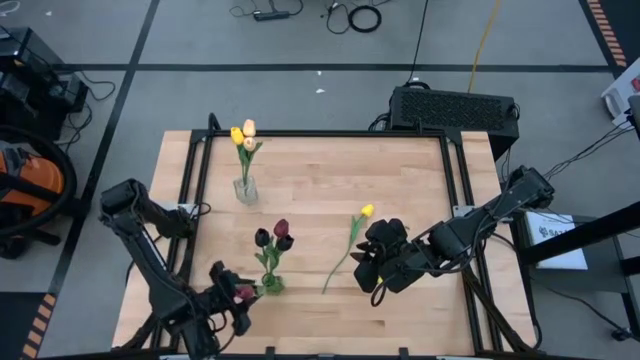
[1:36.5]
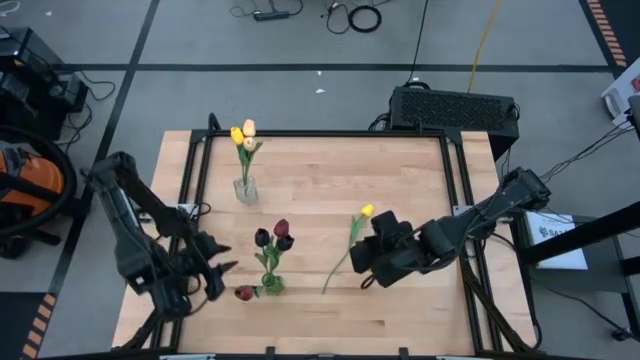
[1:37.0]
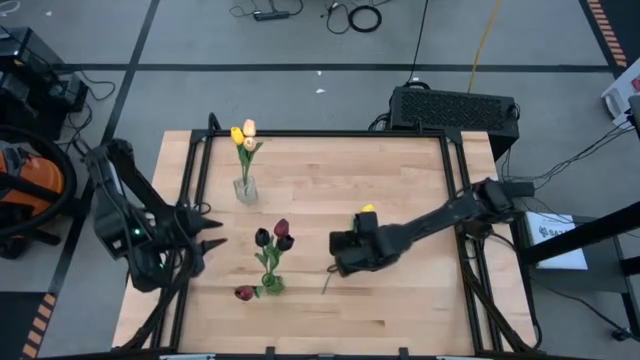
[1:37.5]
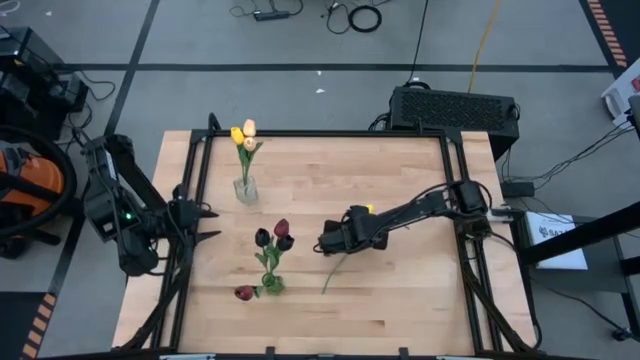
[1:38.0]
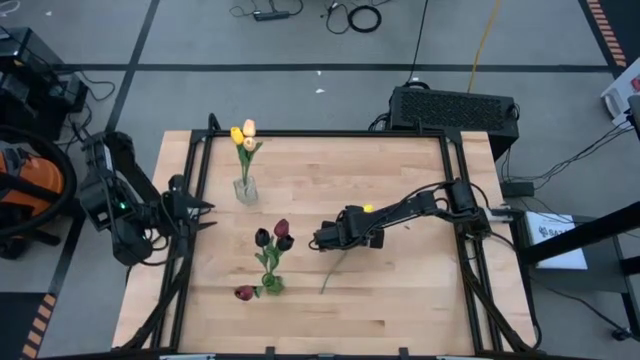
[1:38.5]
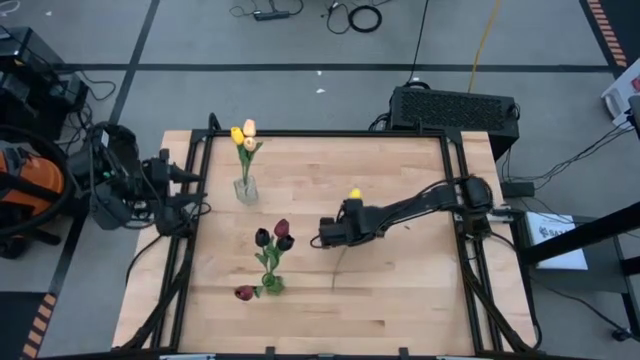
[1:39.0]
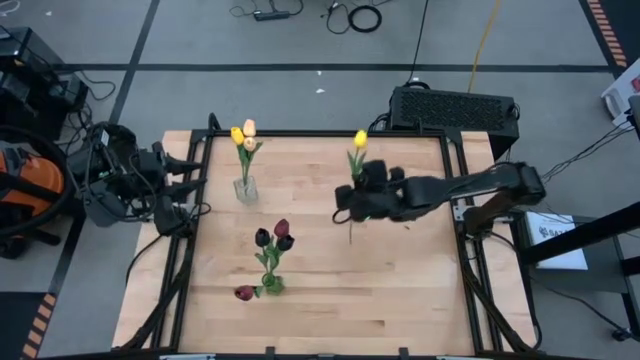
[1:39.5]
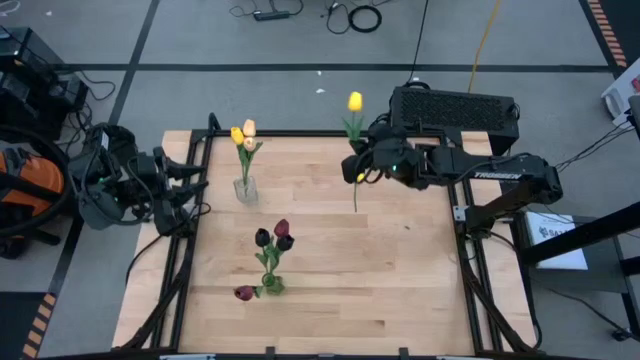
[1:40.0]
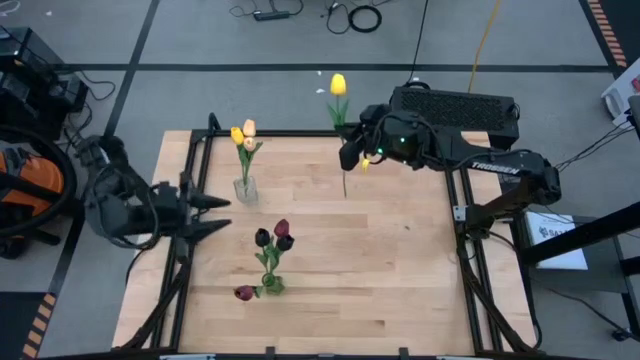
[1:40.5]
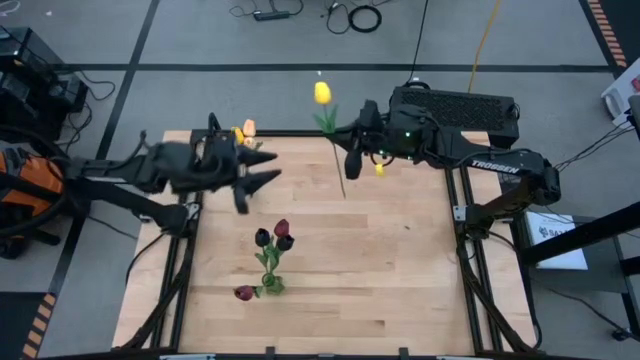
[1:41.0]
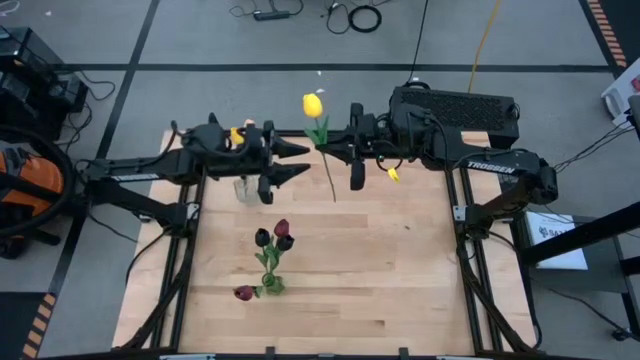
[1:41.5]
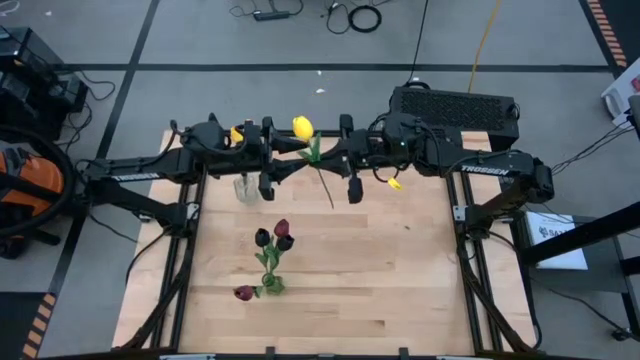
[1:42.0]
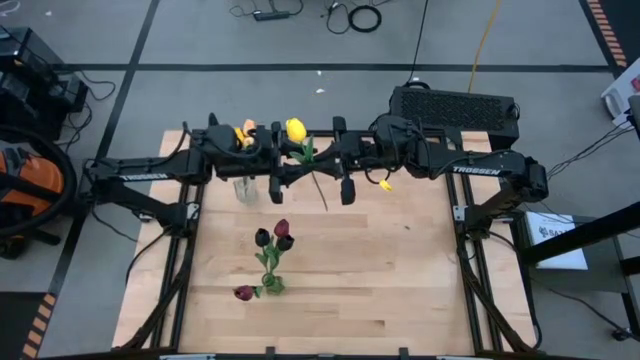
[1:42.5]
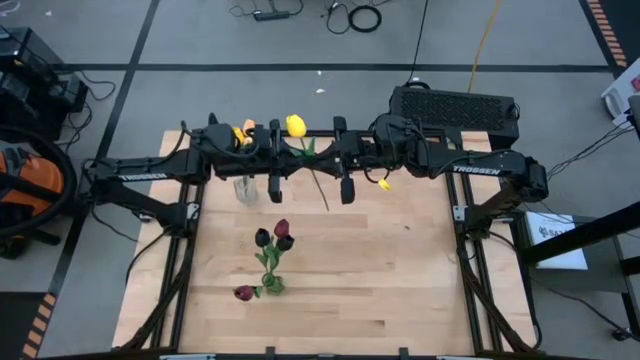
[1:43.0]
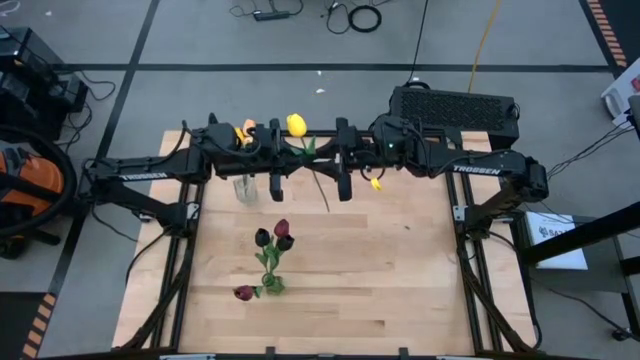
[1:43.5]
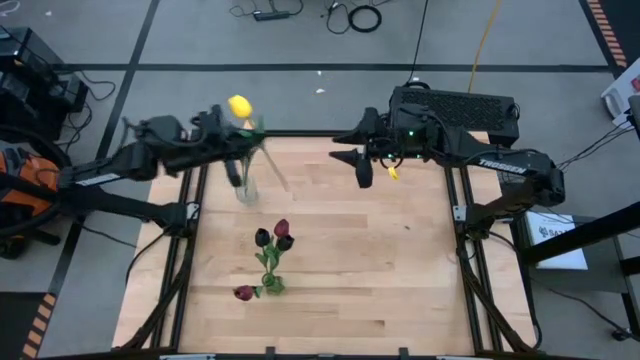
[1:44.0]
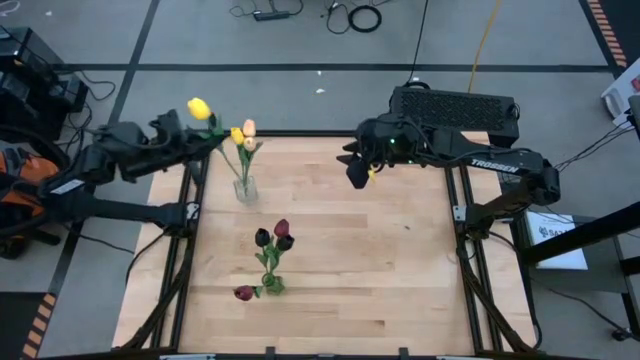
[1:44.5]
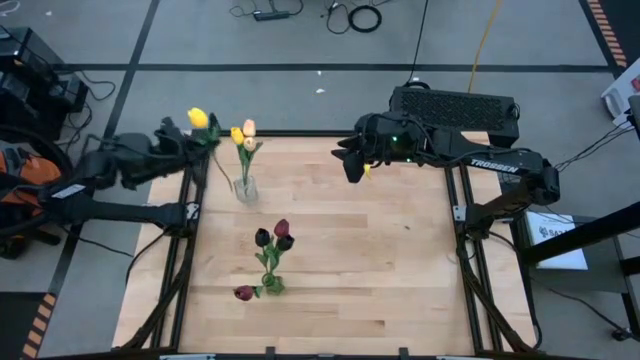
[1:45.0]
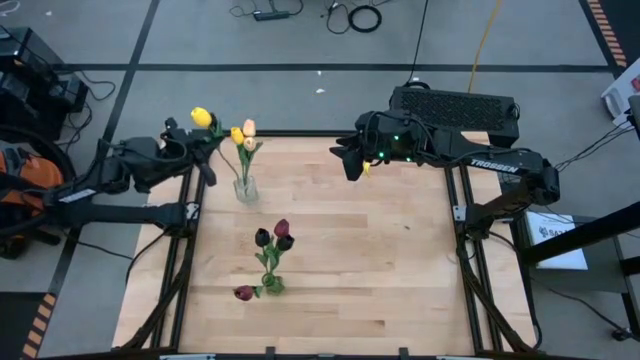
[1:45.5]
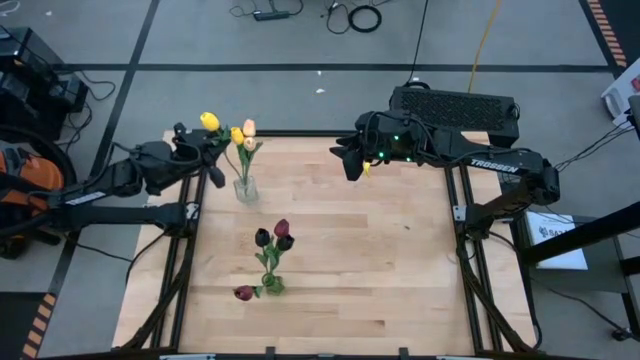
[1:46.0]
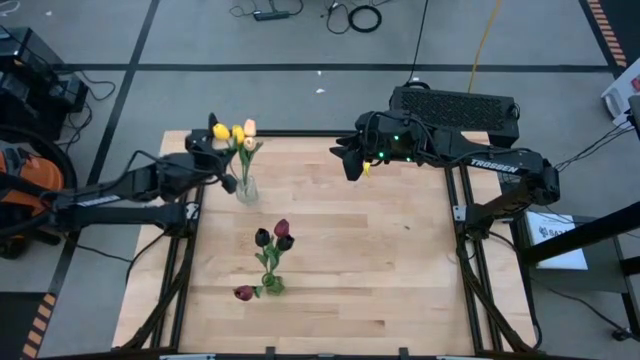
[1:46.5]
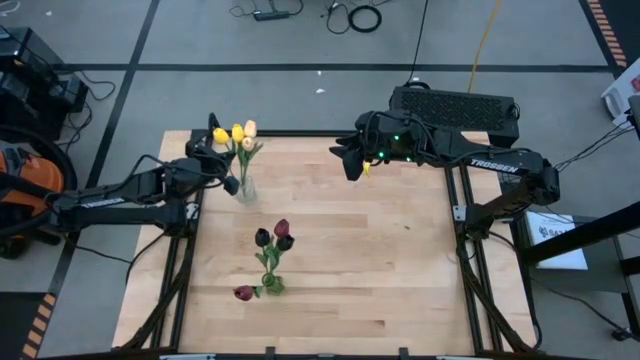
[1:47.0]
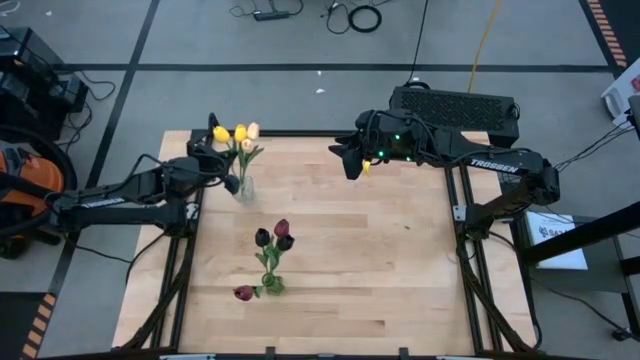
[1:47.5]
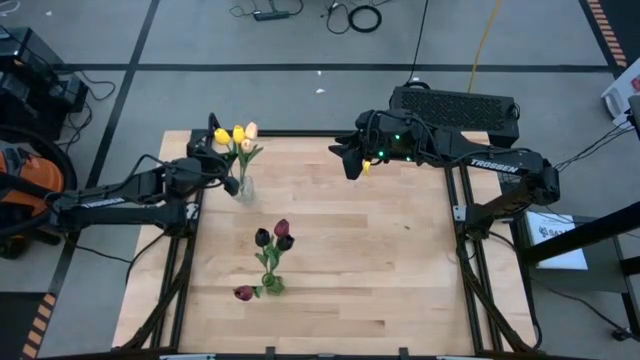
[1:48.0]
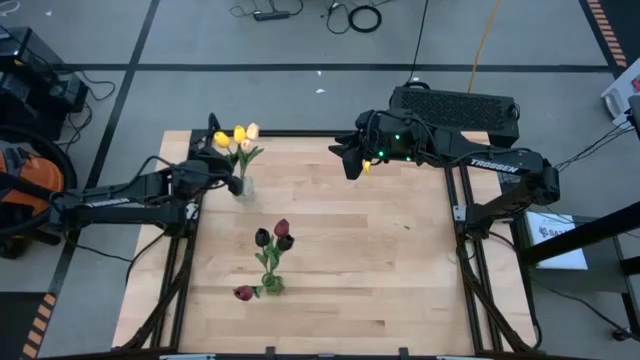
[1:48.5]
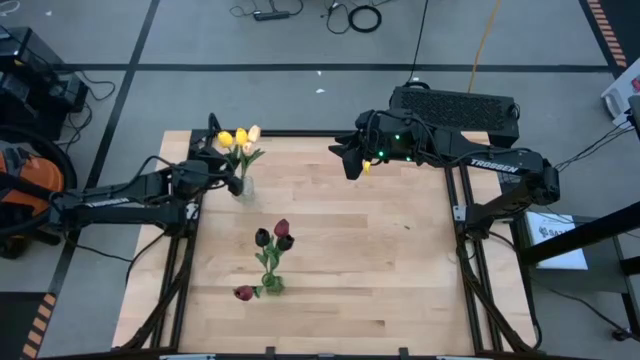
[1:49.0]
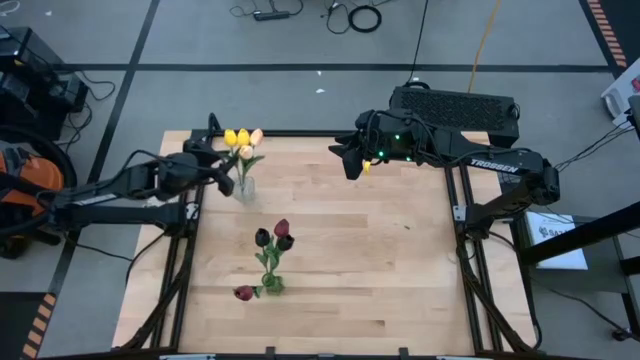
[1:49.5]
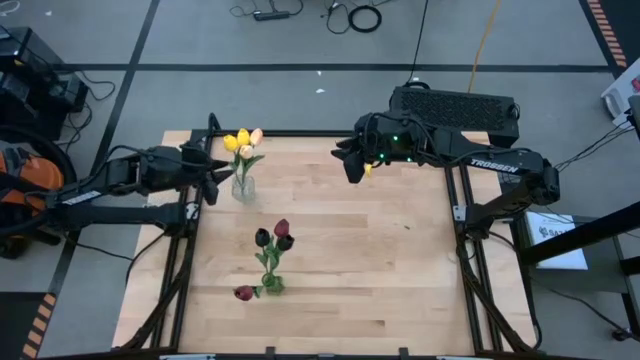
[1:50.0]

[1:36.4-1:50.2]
Task: Sort flowers into vase by color
Put the yellow tulip into the transparent vase

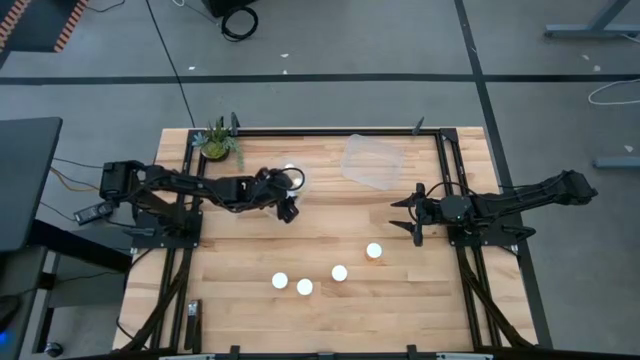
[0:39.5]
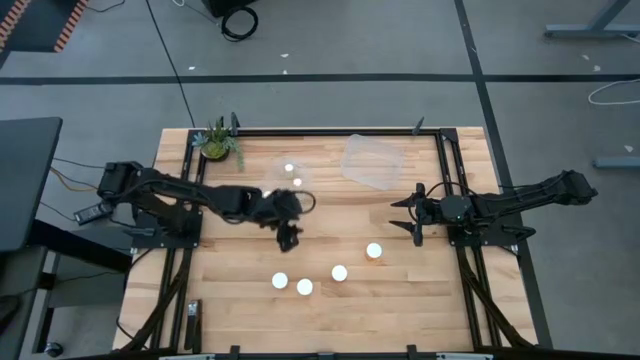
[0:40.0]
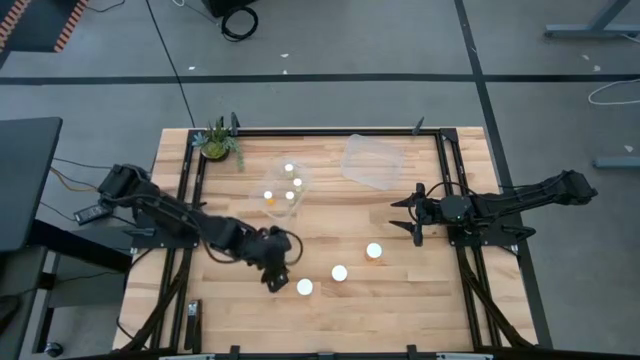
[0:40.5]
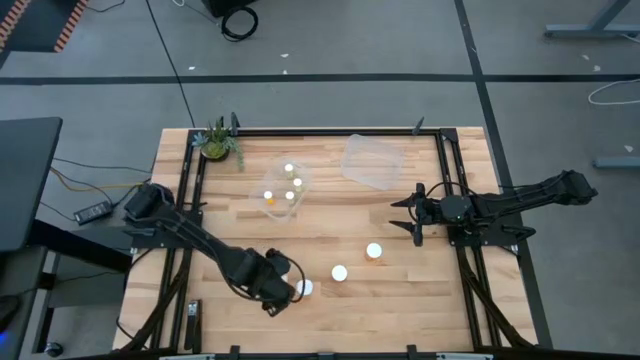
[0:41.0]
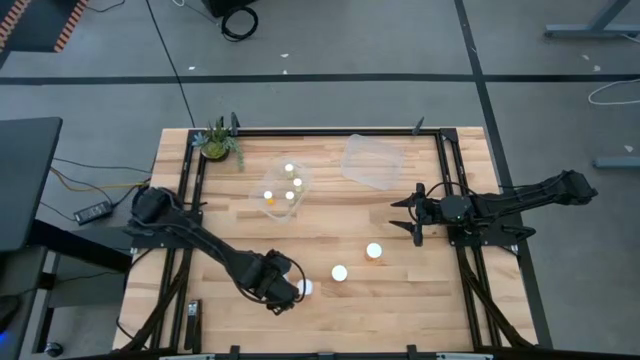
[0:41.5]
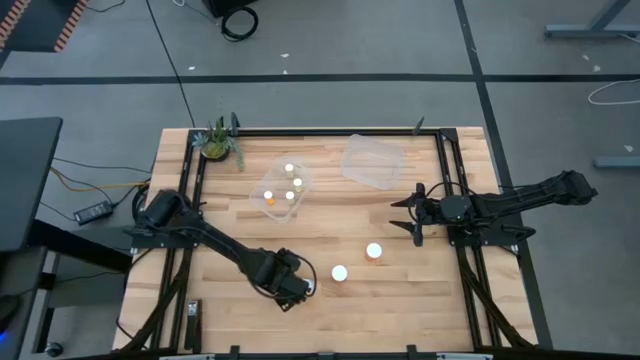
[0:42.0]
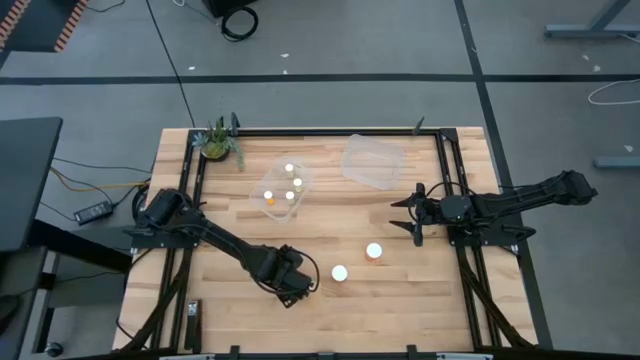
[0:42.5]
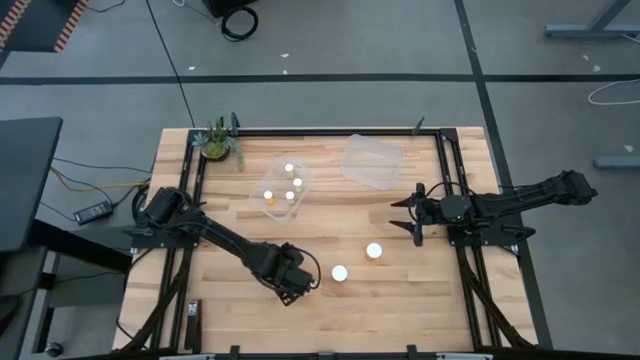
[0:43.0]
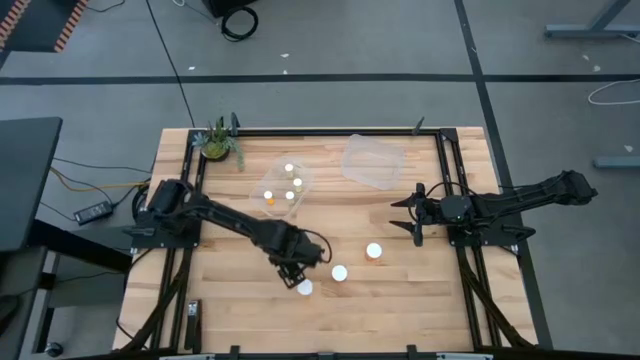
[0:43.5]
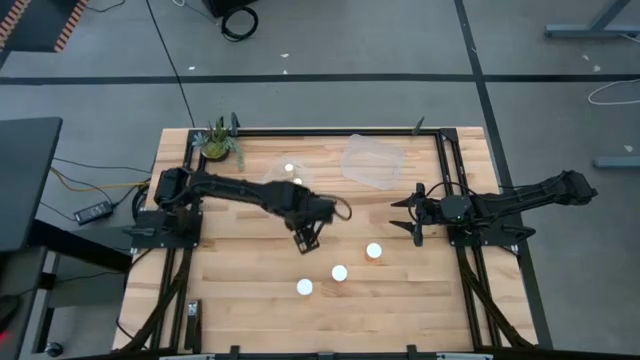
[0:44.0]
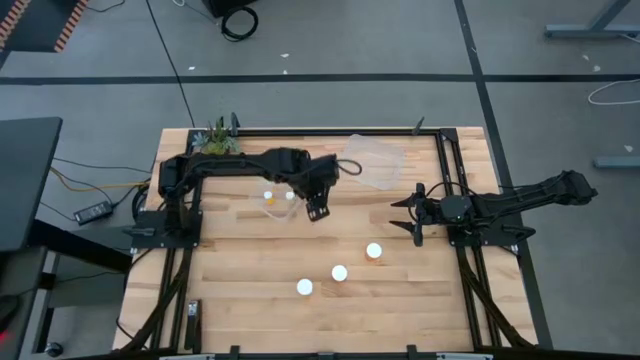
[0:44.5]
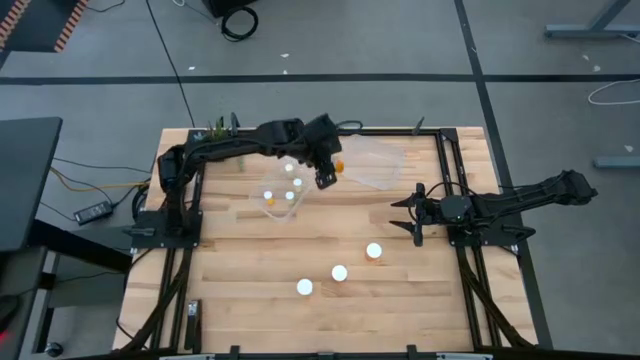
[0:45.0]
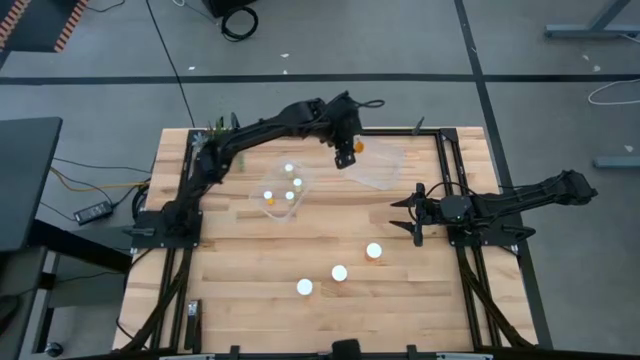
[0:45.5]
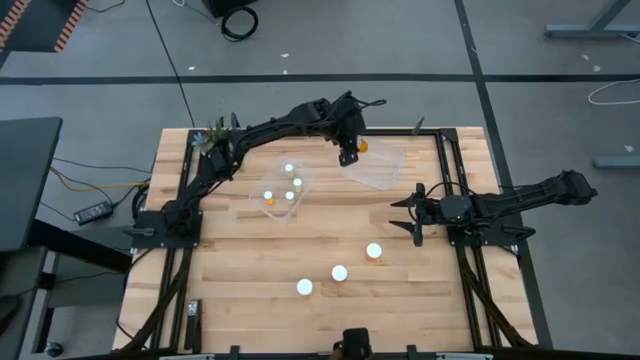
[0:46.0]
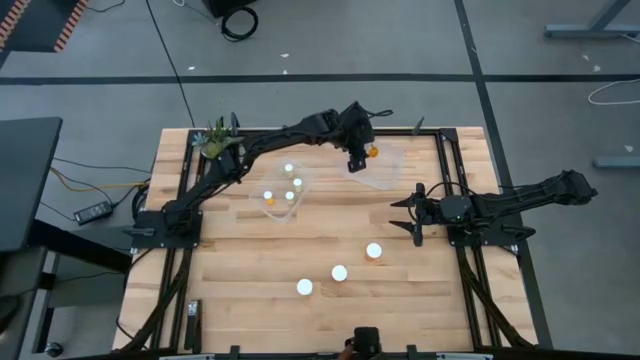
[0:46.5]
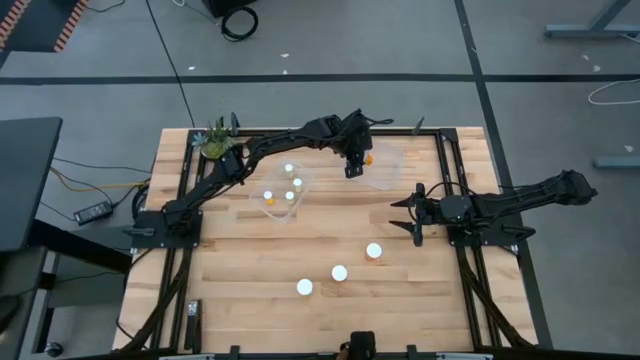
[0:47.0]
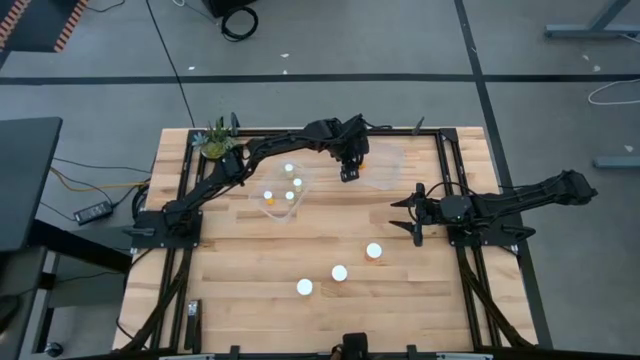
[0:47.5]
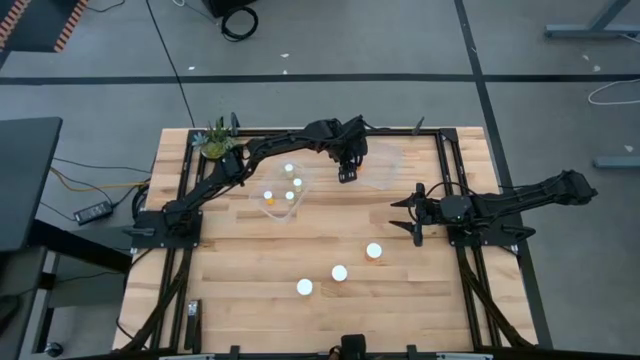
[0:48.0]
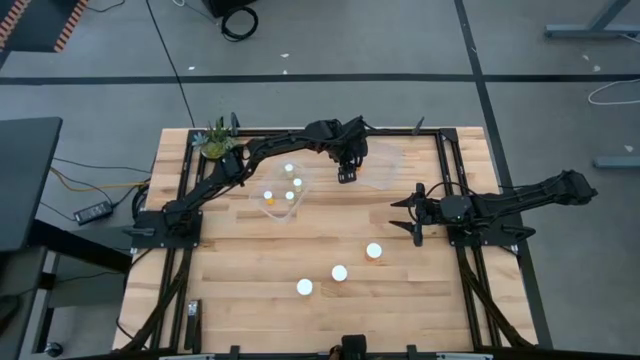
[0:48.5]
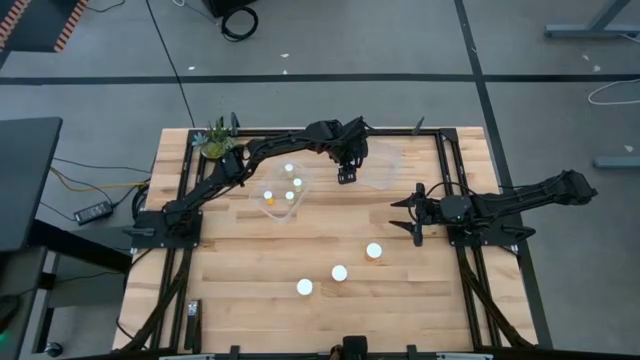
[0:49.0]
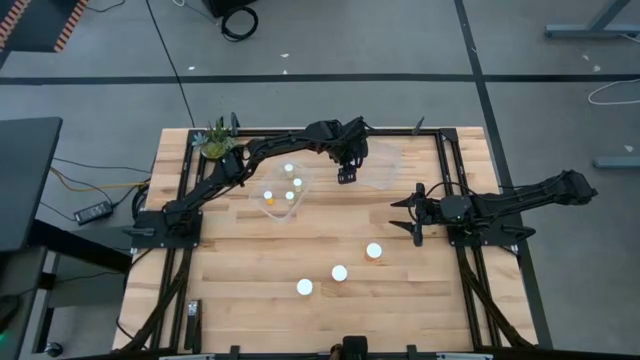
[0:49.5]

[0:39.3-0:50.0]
Task: Pick and place medicine bottles into bin by pill shape (circle, oval)
Put the big orange pill bottle into the right transparent bin
